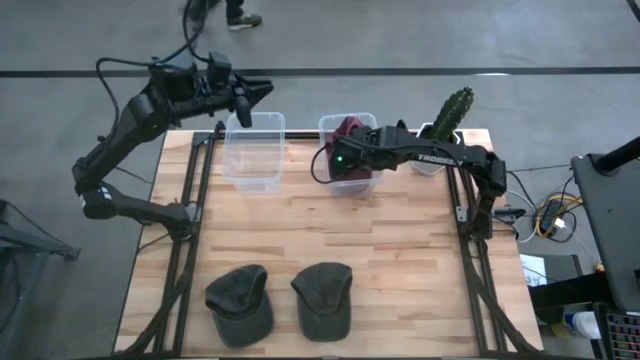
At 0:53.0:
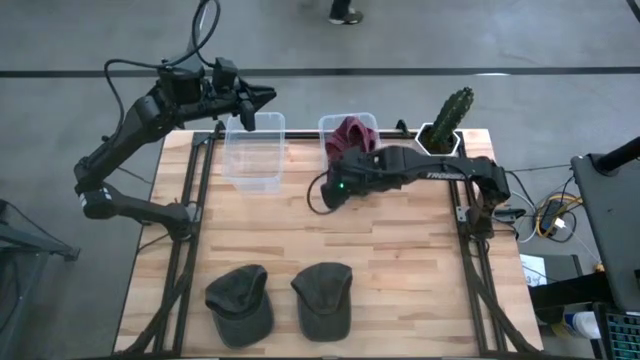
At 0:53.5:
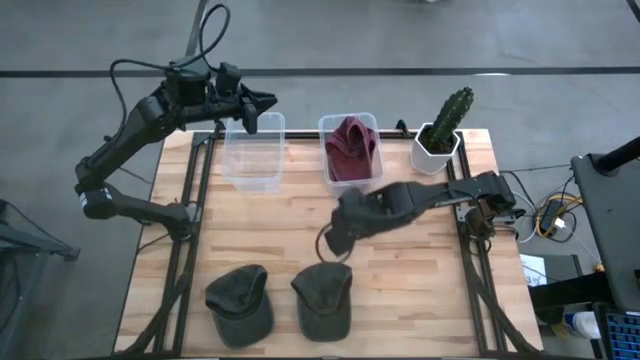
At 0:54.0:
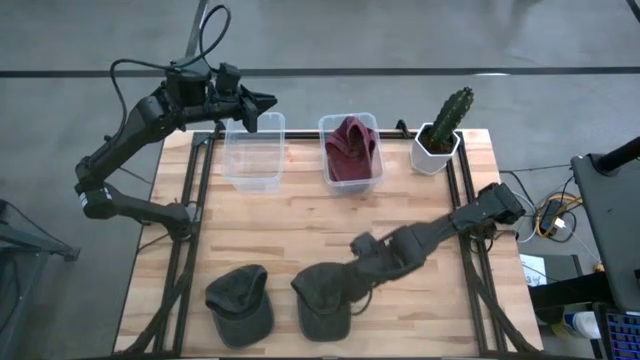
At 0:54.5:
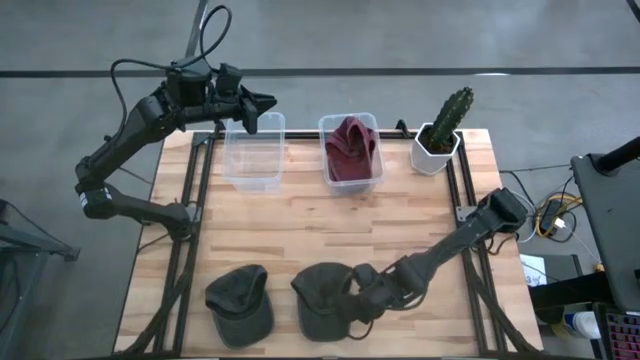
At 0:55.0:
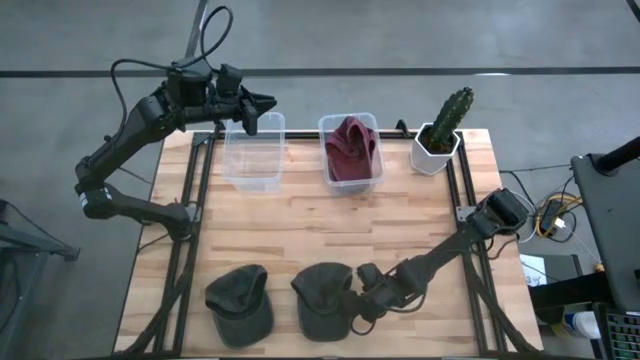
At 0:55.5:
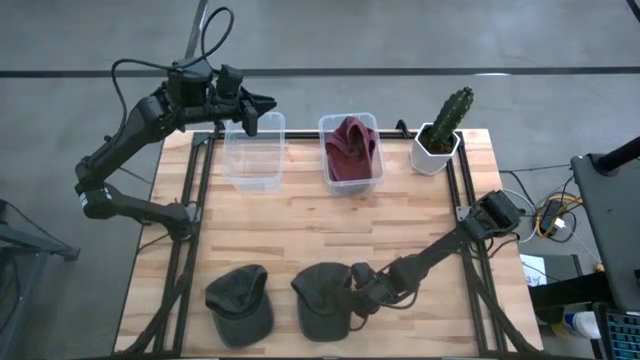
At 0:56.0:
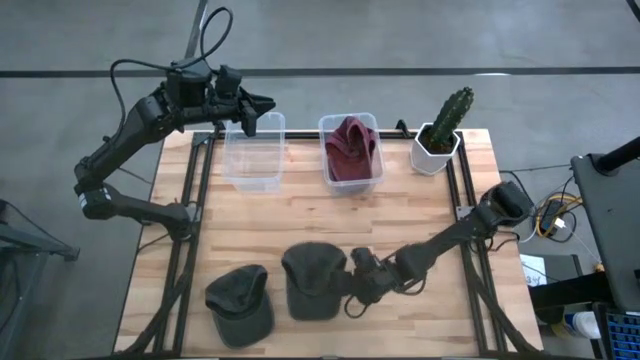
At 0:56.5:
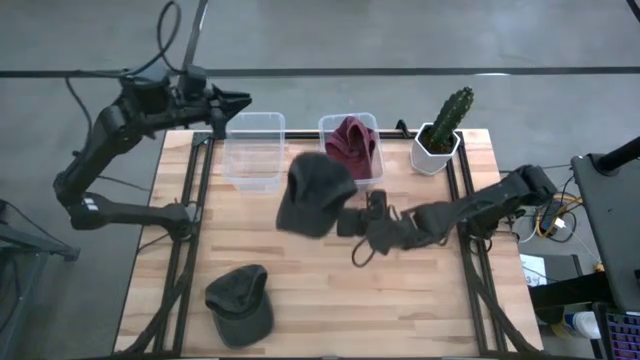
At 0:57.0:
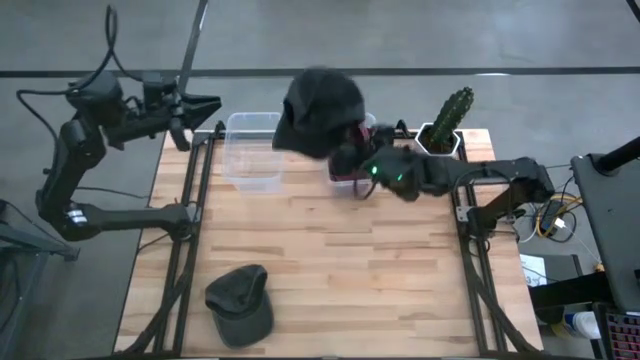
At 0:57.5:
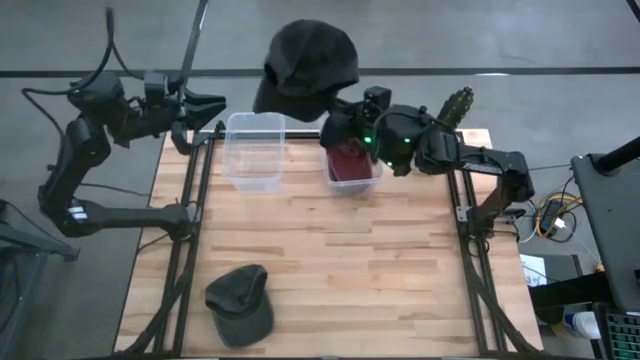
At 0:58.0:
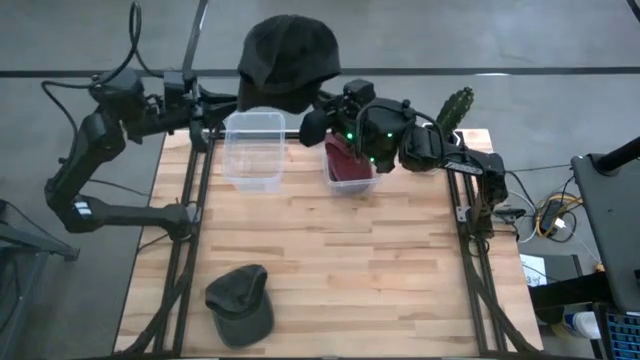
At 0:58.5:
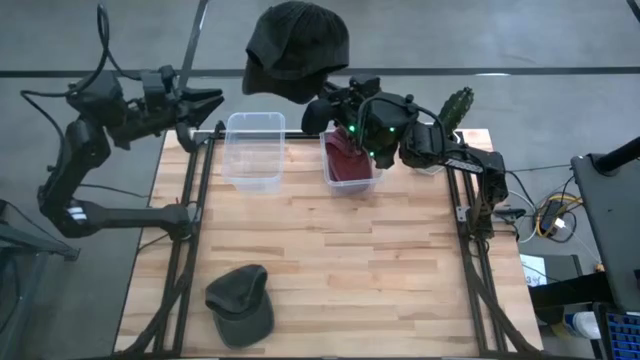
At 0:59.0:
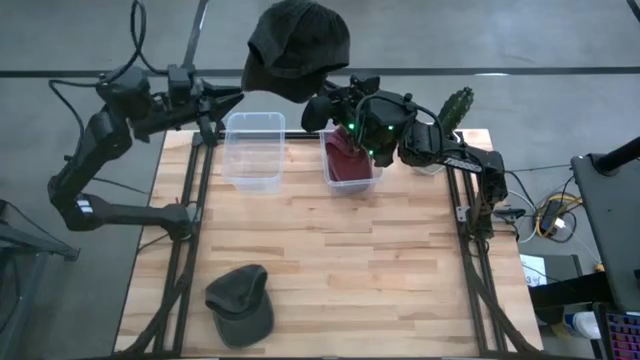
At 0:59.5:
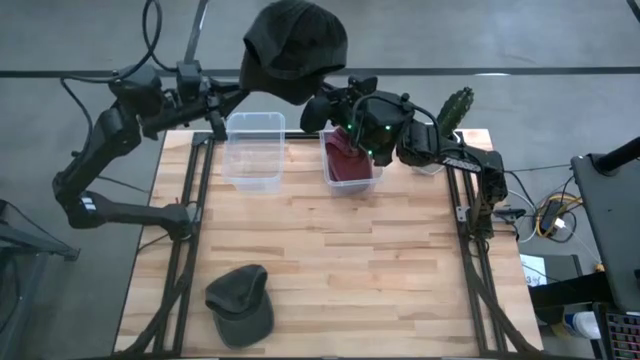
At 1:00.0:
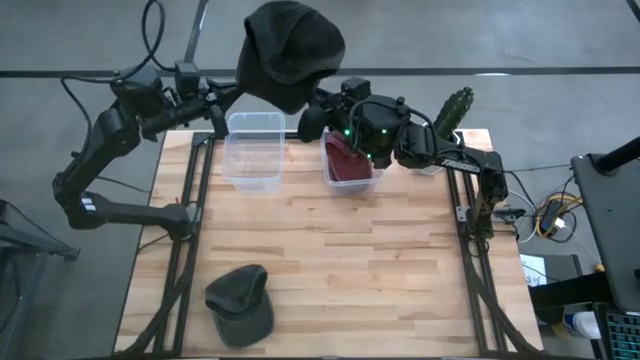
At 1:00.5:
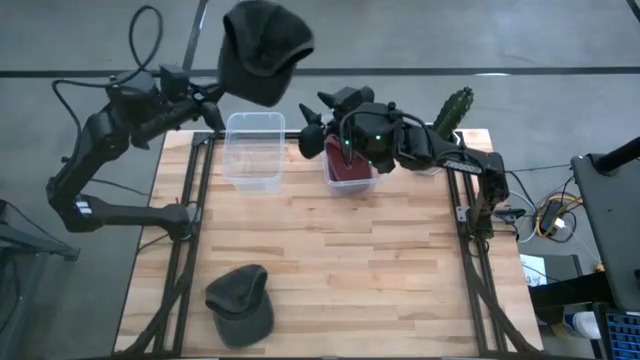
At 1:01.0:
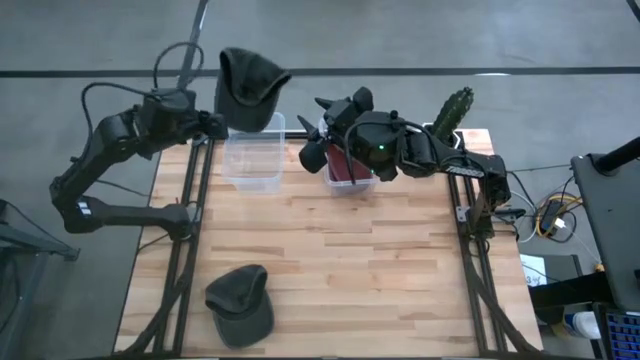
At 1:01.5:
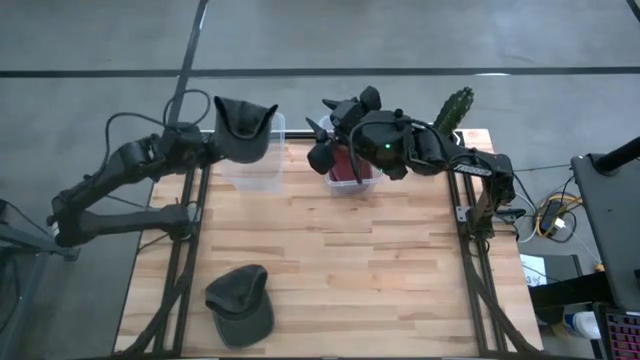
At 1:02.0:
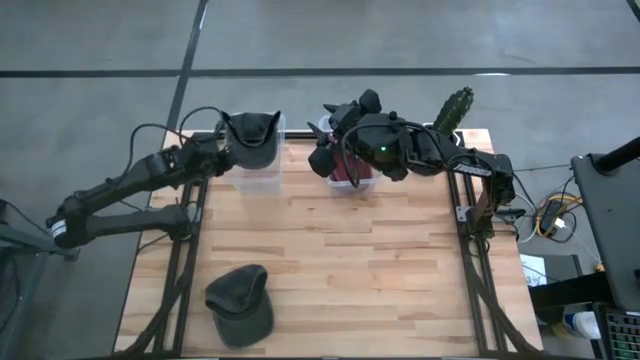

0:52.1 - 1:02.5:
Task: Pick & Place hat
Put the right black cap into the left transparent bin

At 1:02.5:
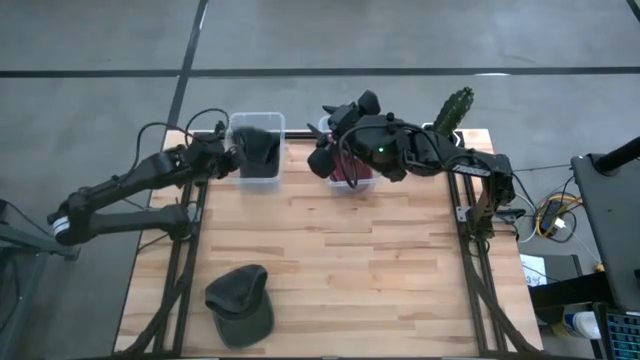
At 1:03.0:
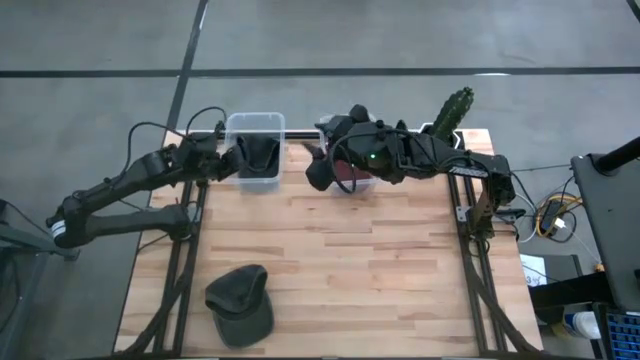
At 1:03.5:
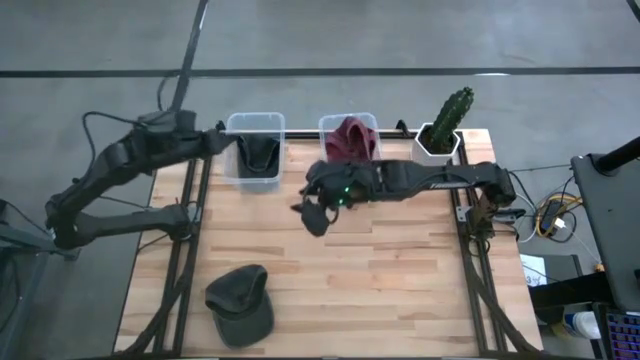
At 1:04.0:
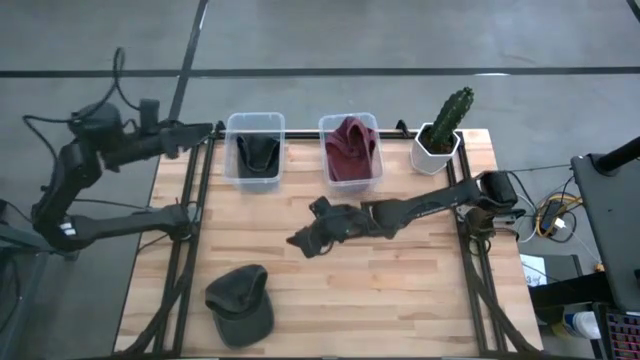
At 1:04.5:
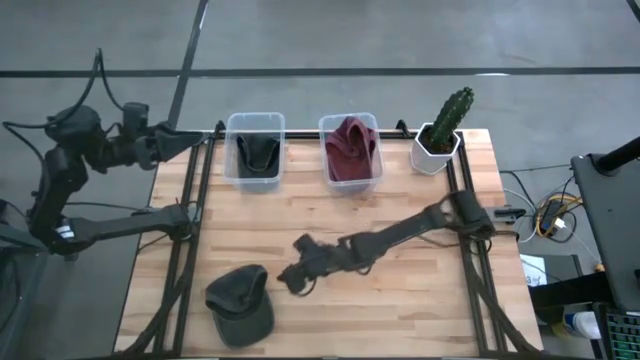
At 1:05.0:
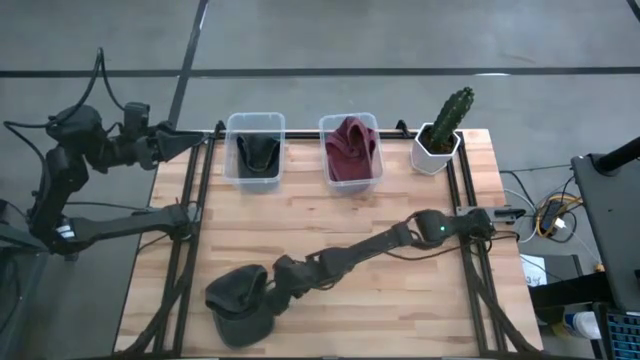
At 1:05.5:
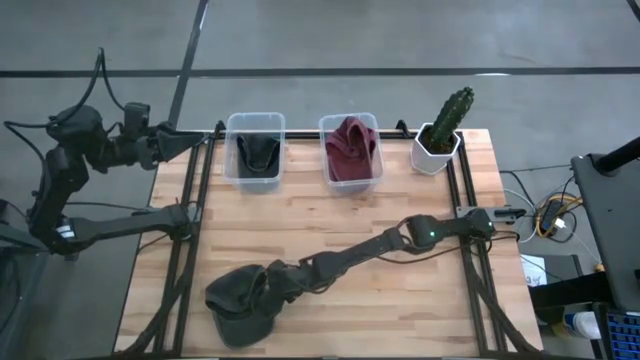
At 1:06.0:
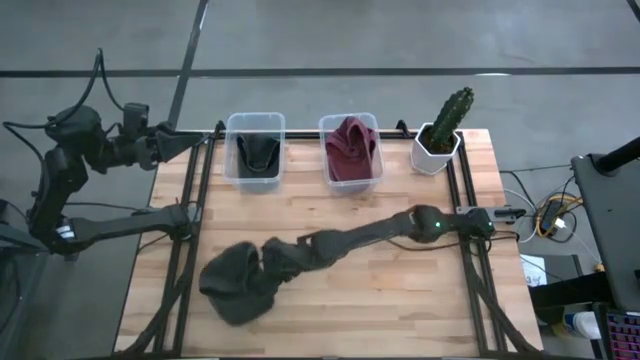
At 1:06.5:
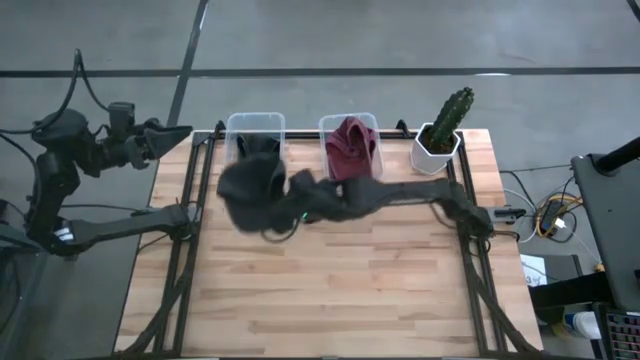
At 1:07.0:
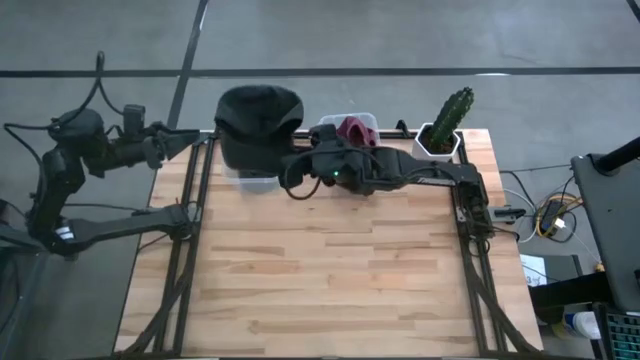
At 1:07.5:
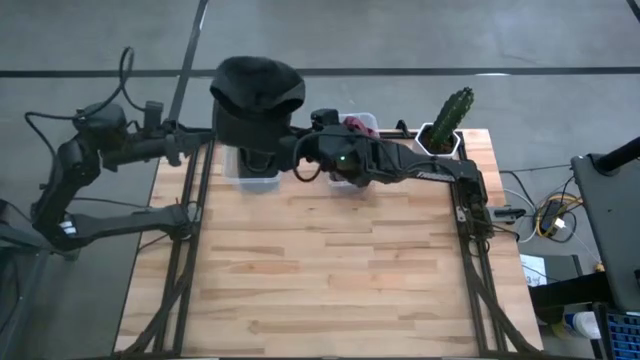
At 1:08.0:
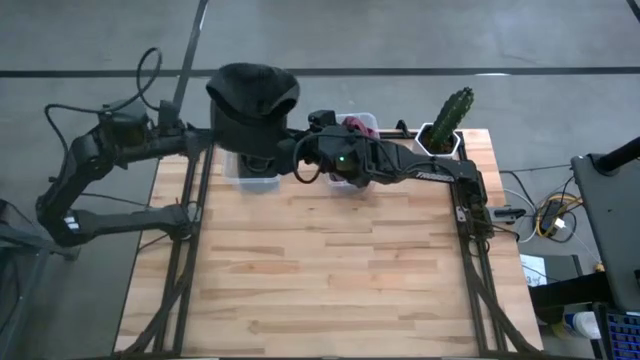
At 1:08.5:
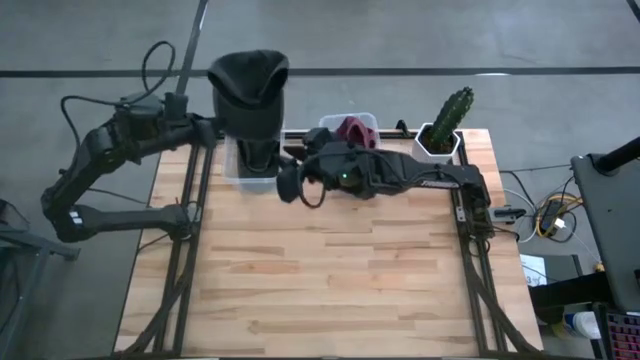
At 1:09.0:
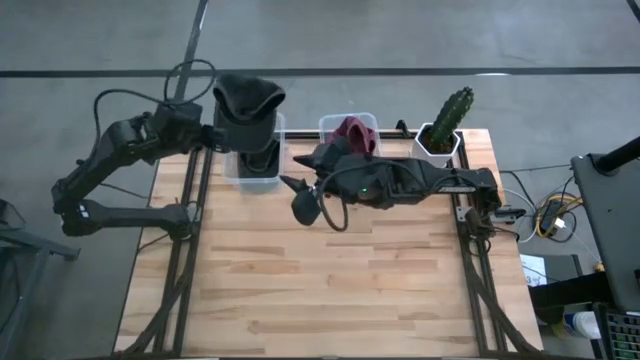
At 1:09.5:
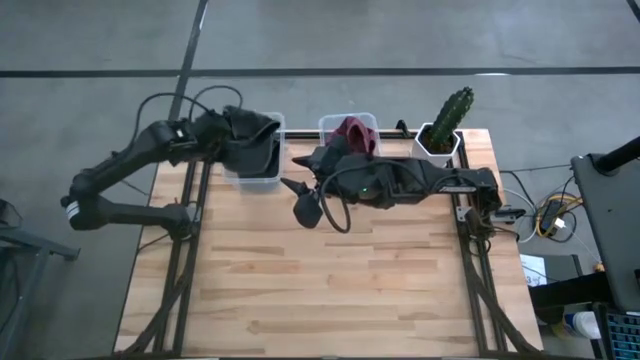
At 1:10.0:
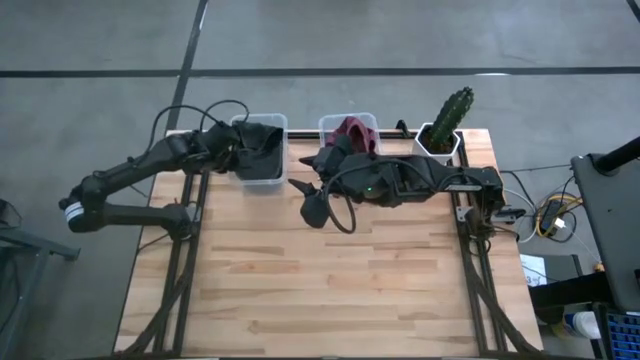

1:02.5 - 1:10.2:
Put the black cap into the left transparent bin

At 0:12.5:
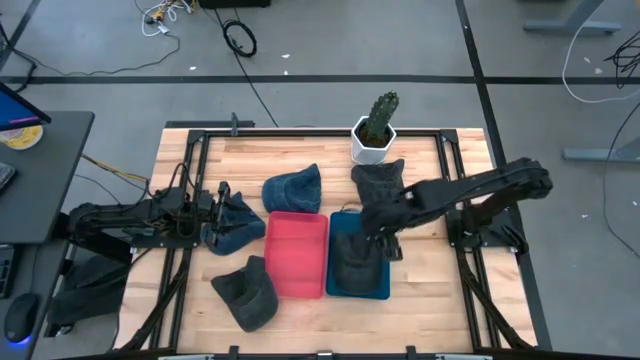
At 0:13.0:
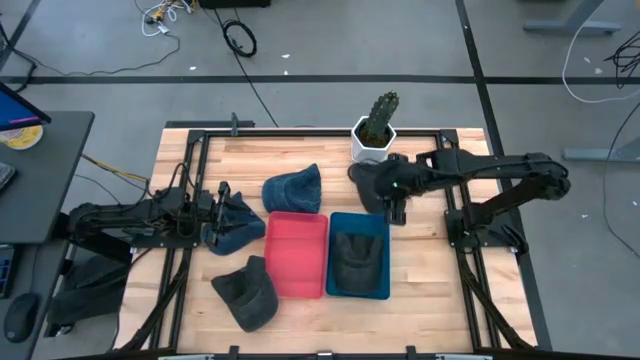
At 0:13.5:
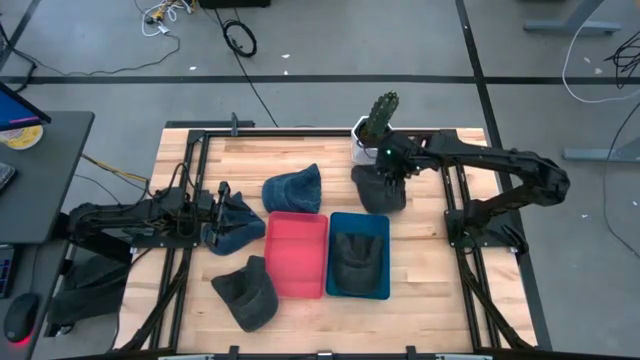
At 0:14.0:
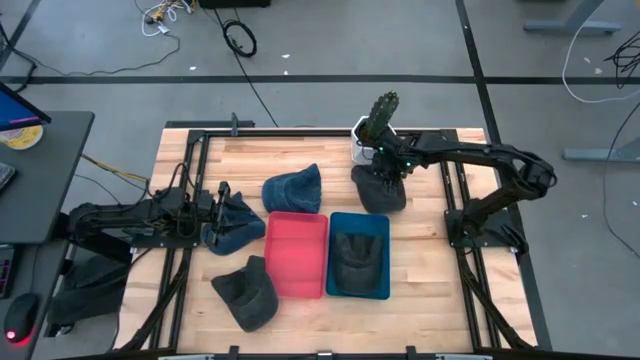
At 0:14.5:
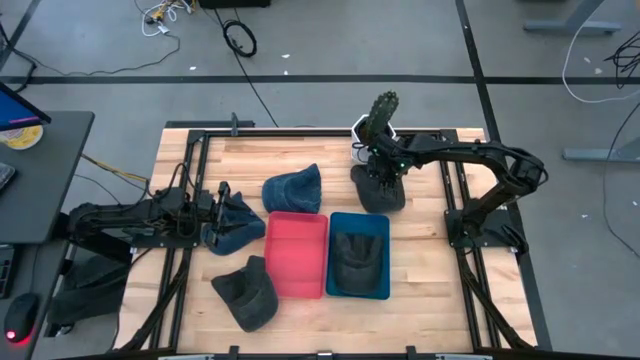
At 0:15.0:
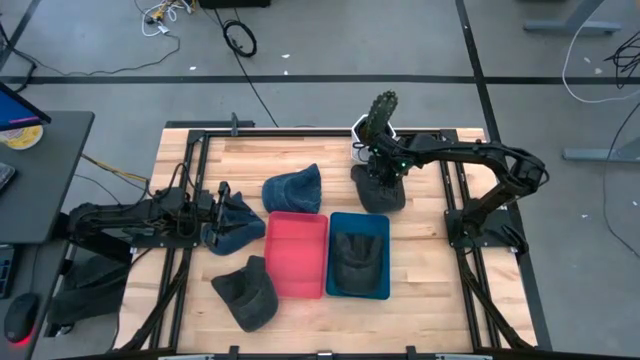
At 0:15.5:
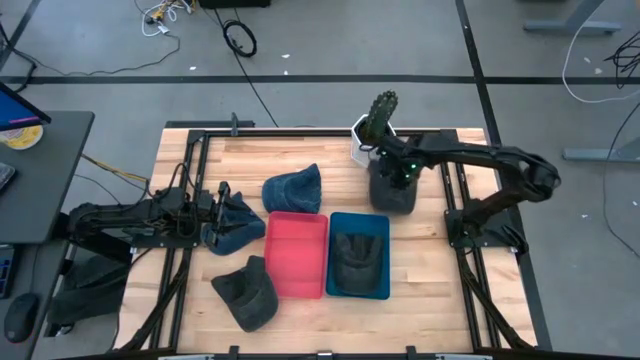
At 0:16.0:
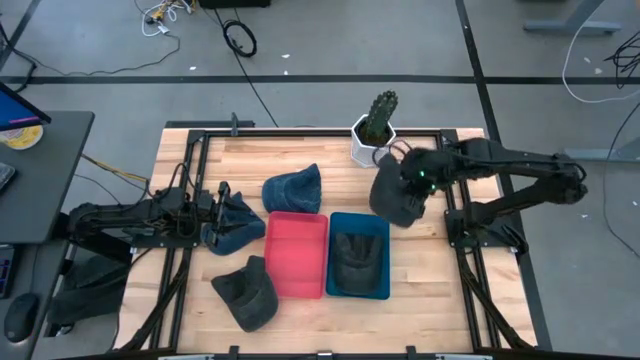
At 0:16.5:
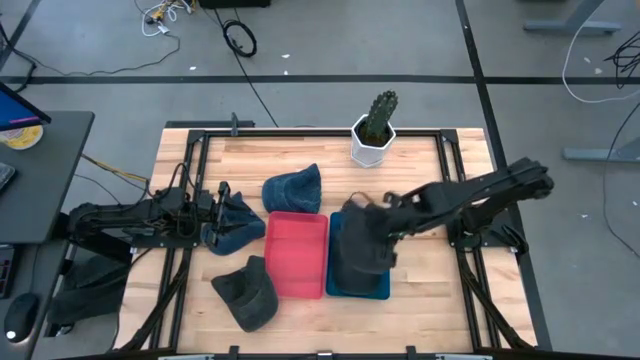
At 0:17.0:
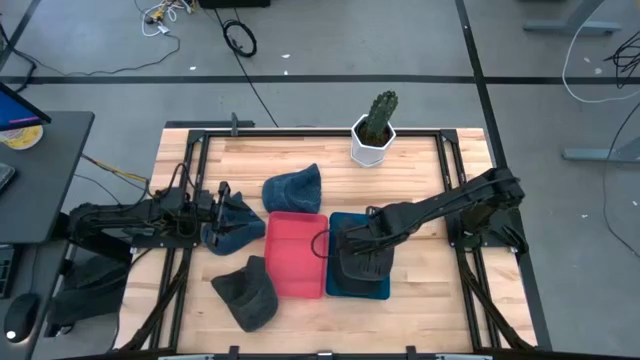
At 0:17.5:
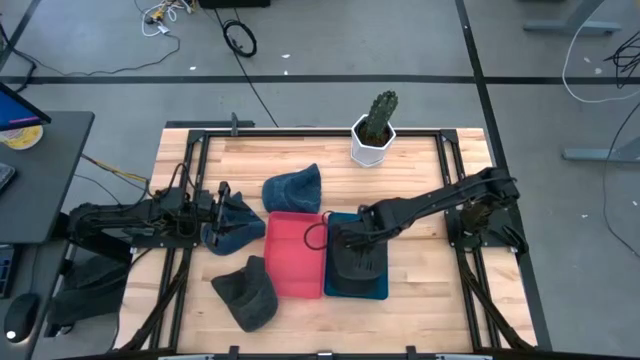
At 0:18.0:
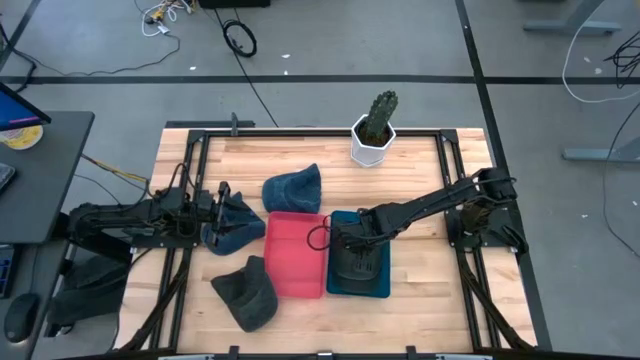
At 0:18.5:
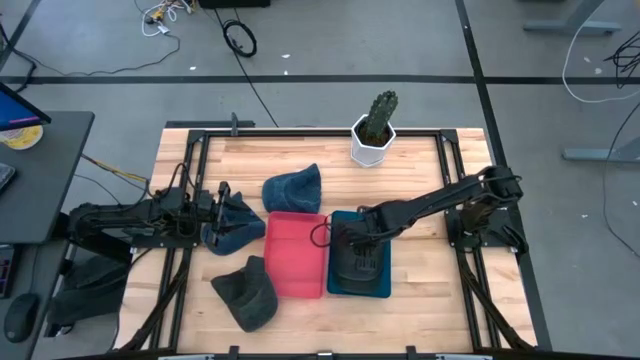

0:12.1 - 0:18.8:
Task: Pick & Place hat
Put the top black cap in the blue bin
